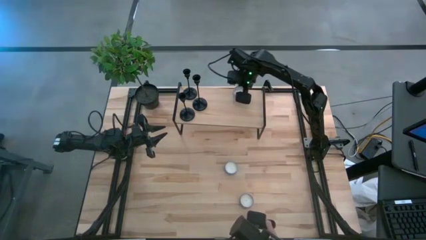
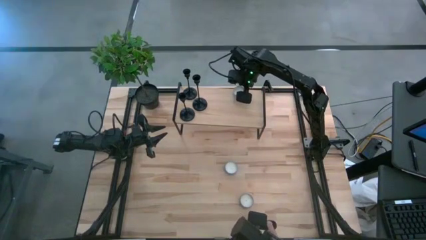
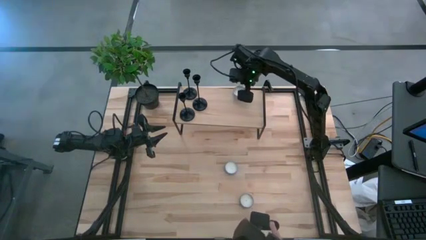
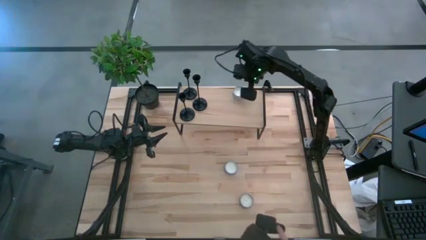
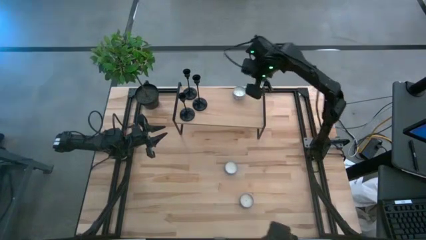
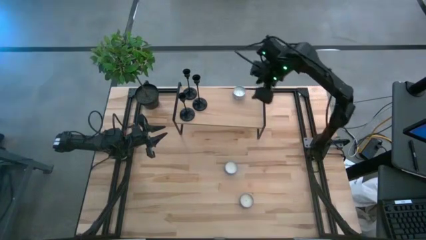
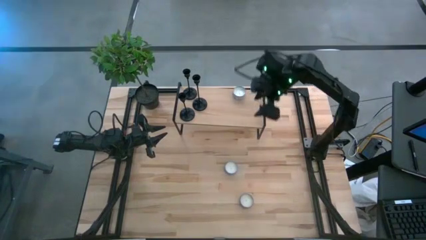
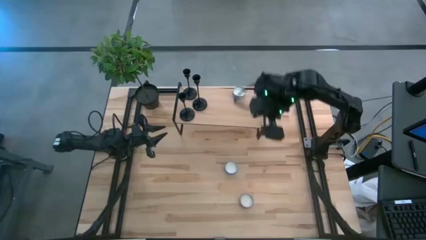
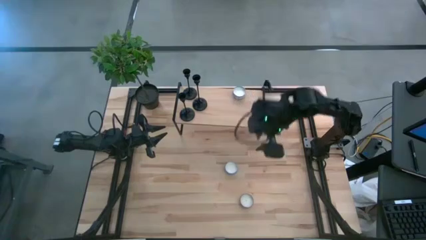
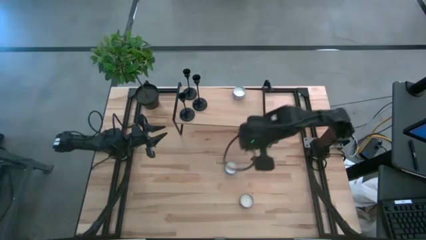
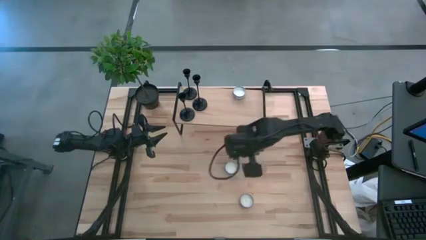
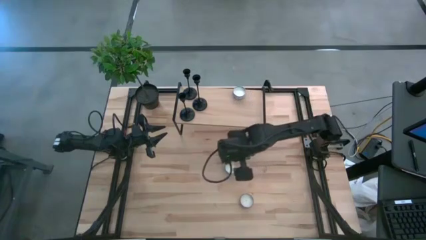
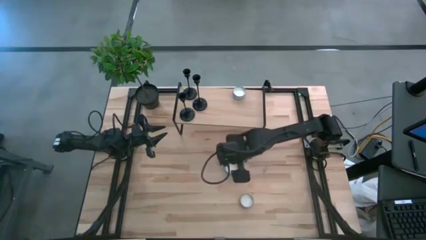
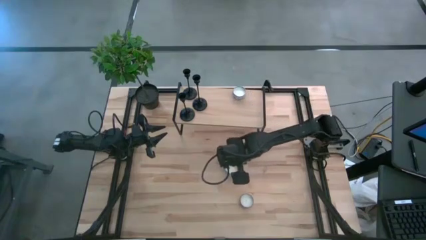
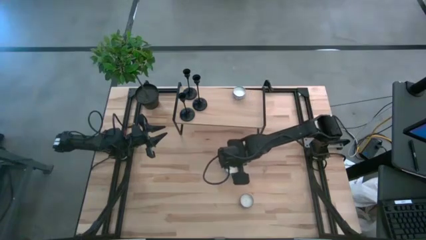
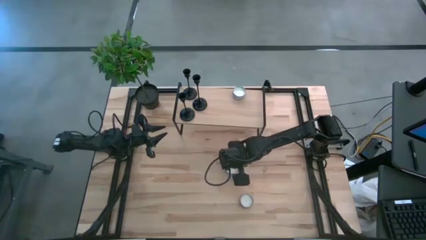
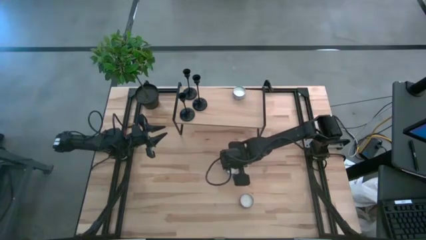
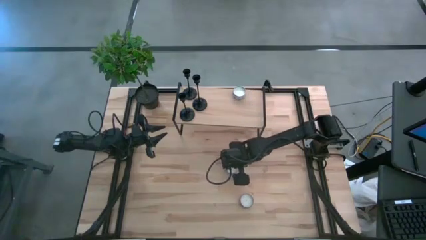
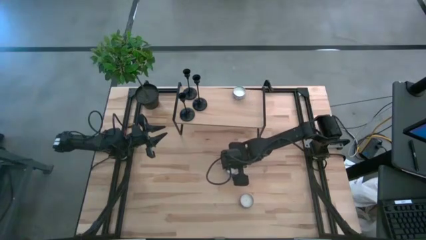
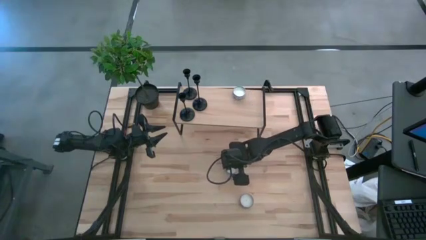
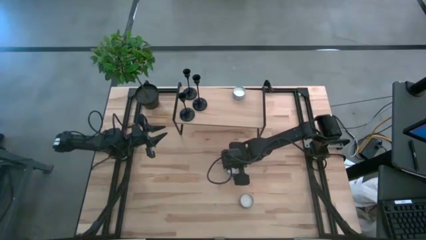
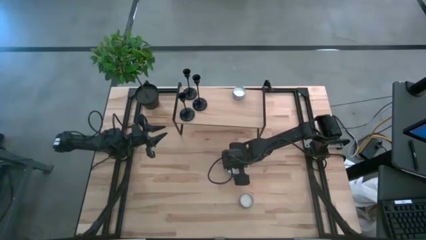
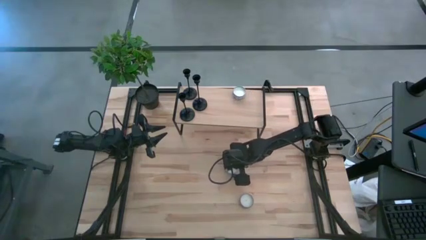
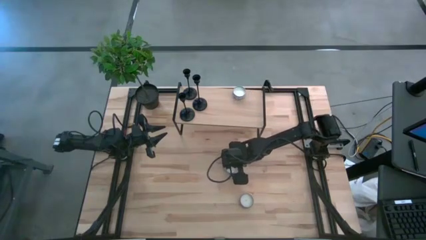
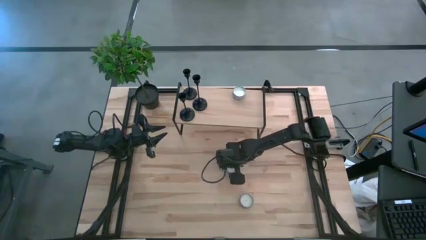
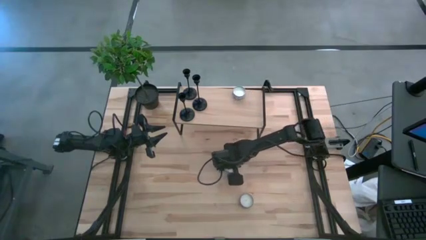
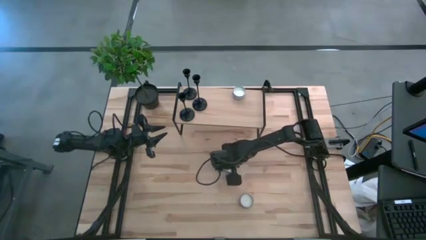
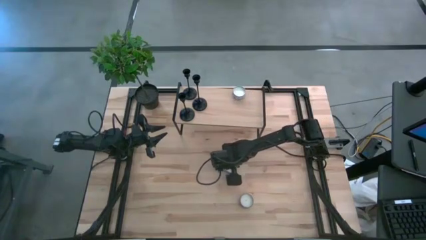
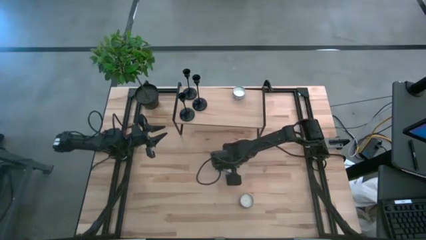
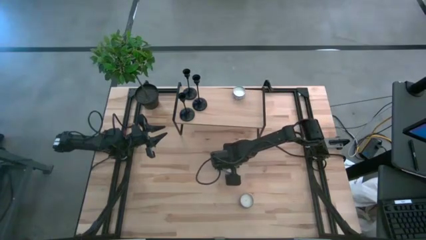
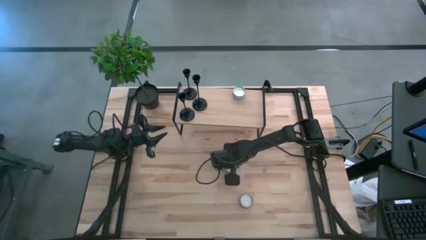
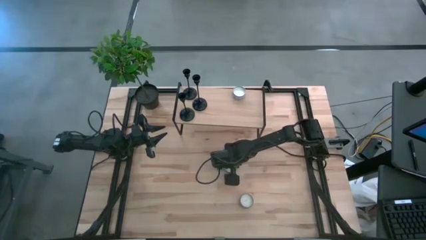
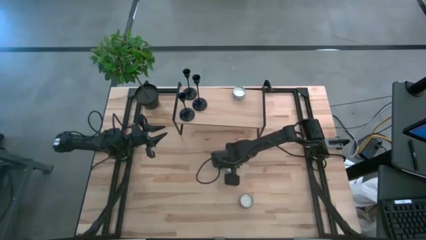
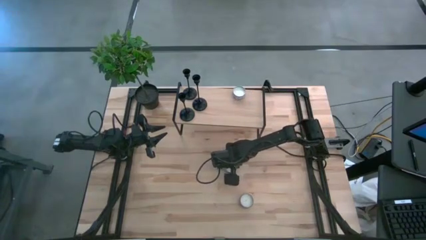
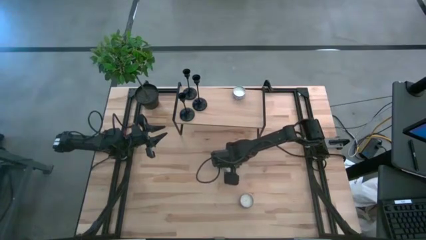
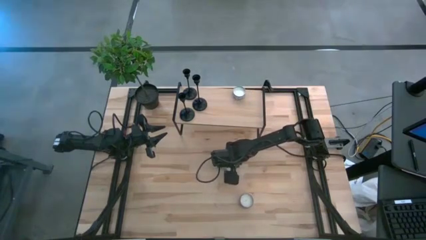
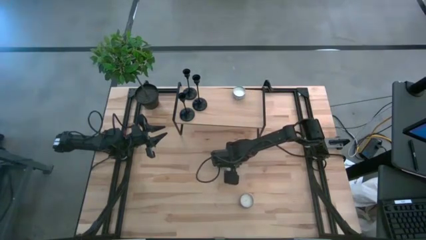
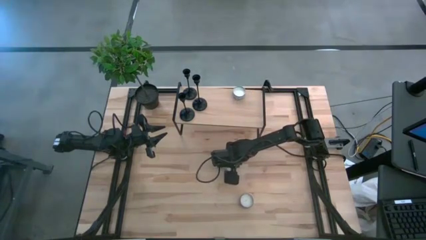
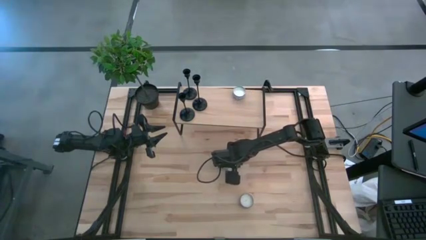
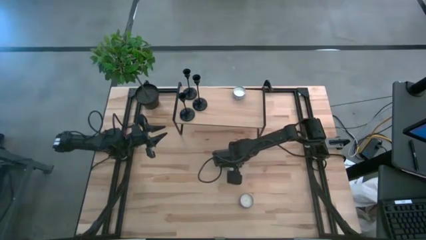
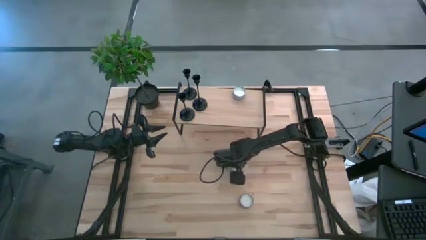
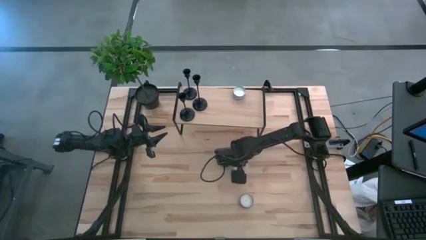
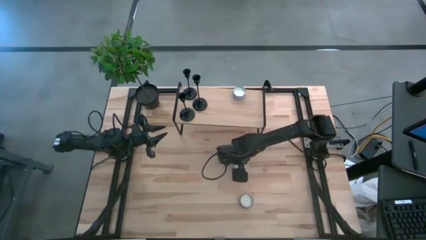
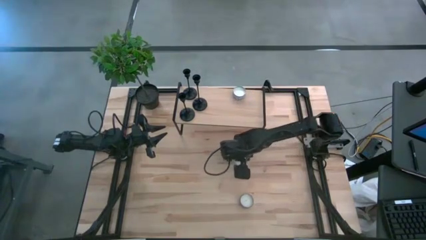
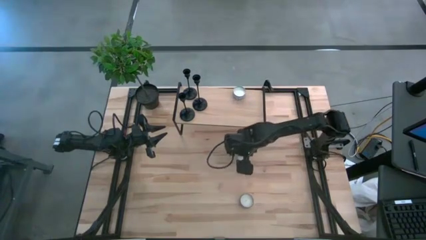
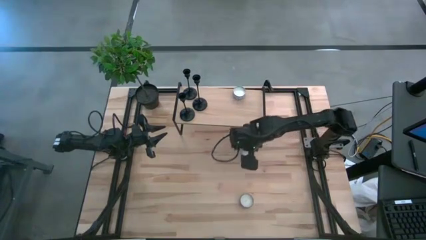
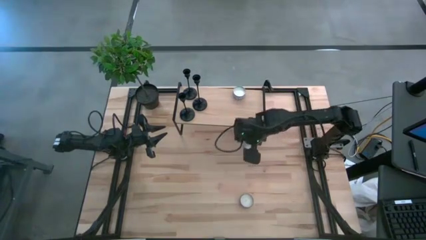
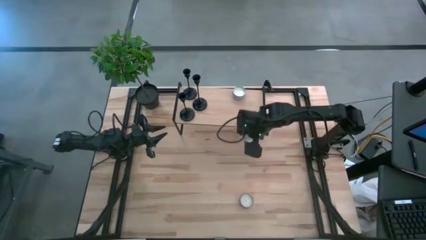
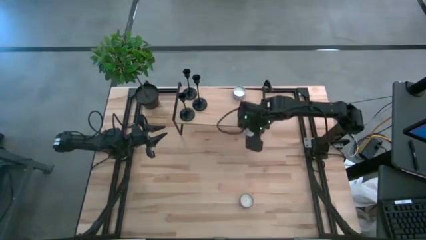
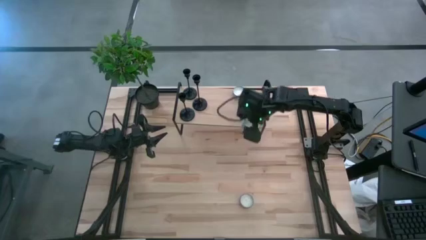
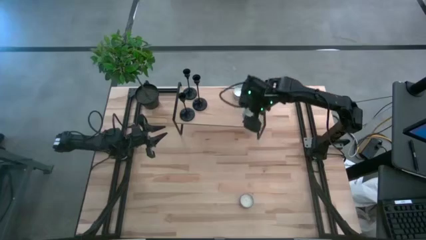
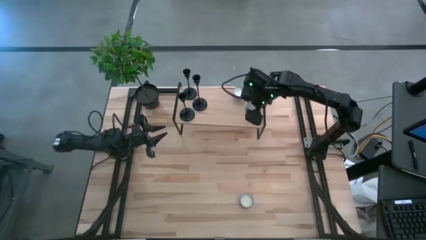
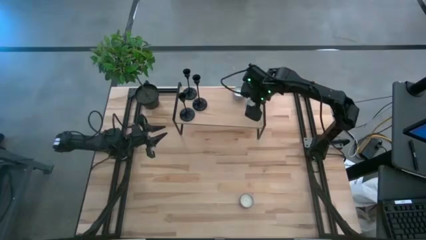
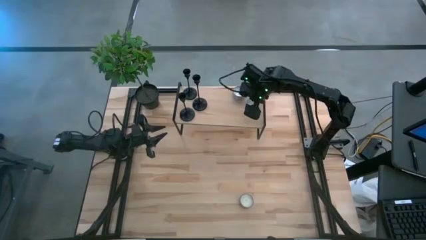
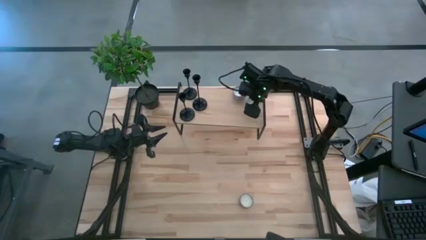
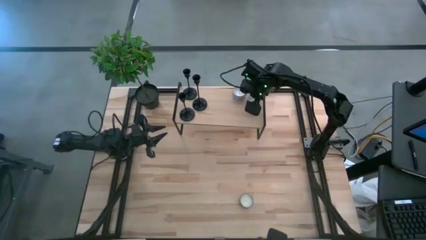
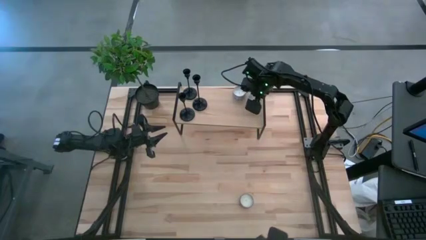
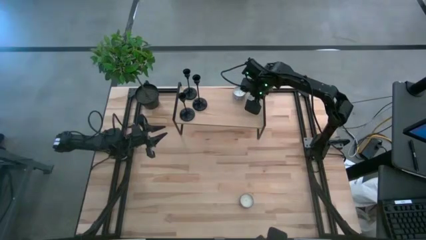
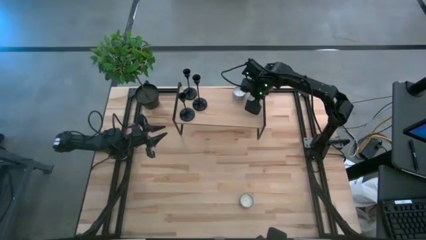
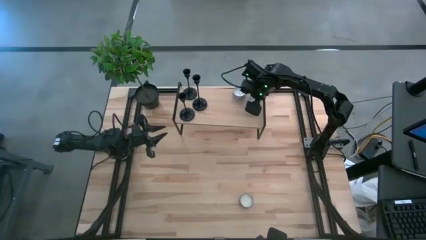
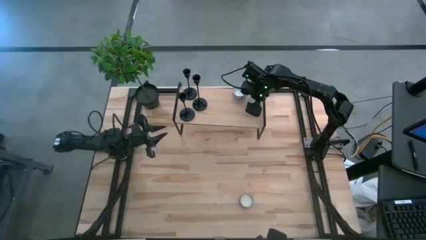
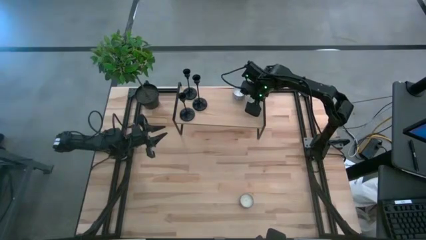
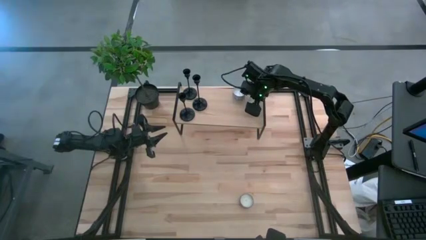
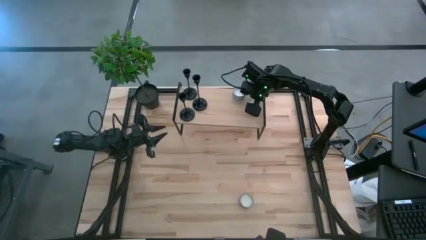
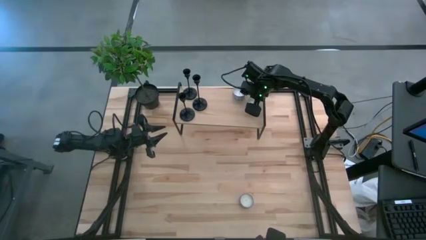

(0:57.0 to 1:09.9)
Task: Pick & Place candle stick holders
Put the blue patterned scented candle on the shelf

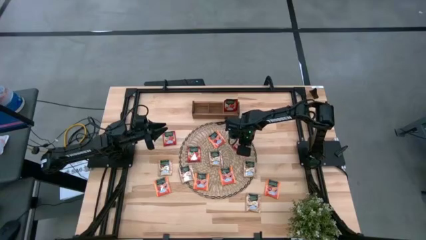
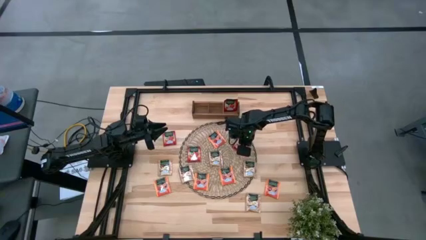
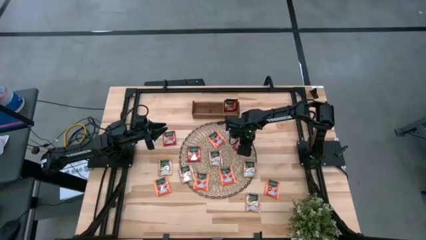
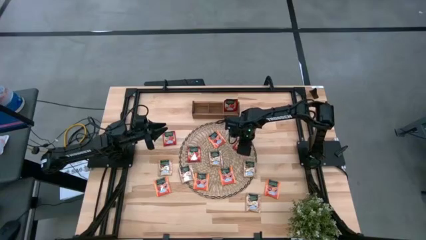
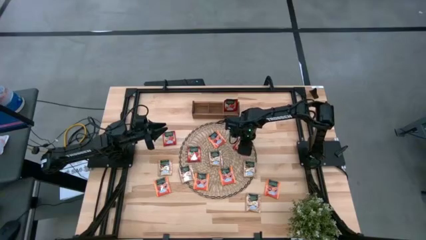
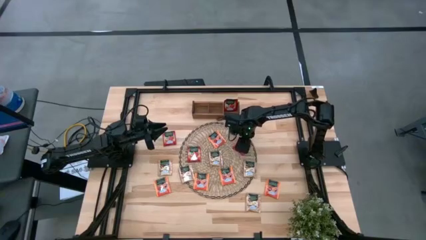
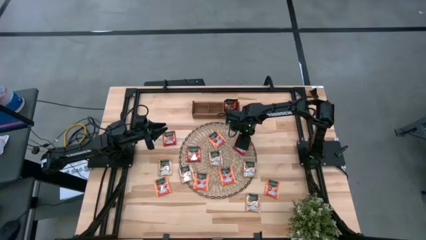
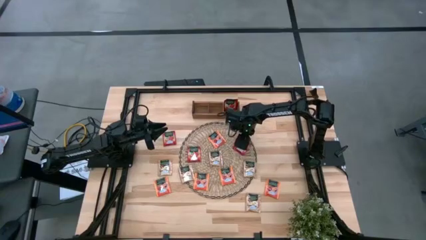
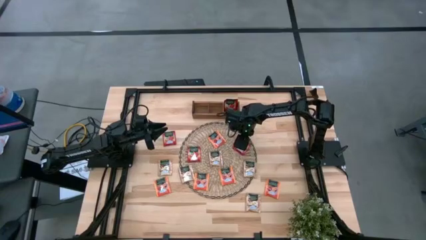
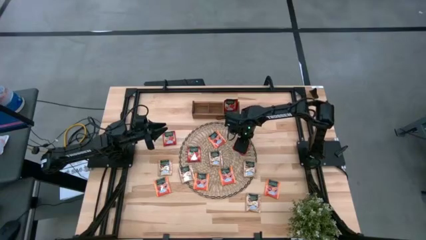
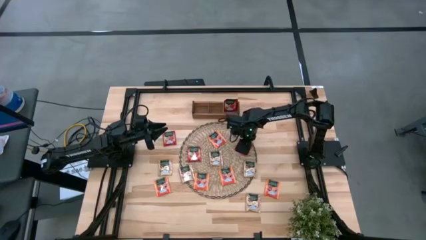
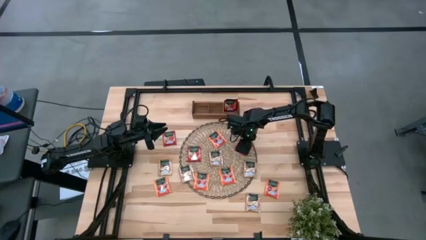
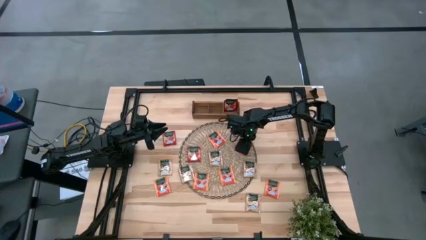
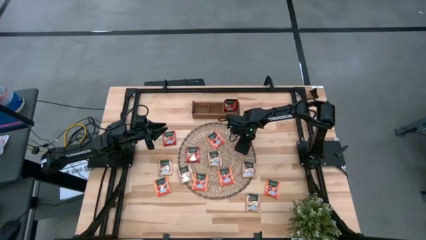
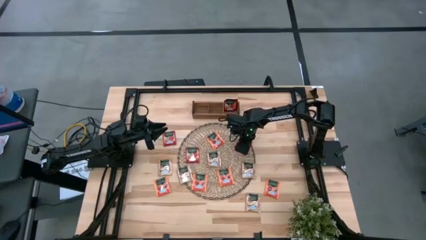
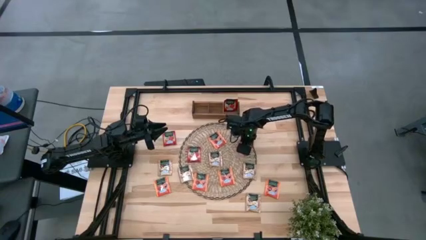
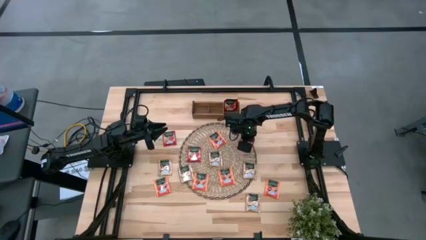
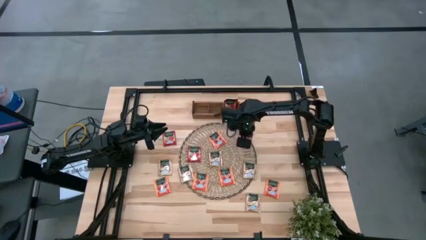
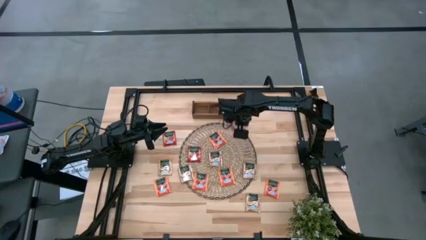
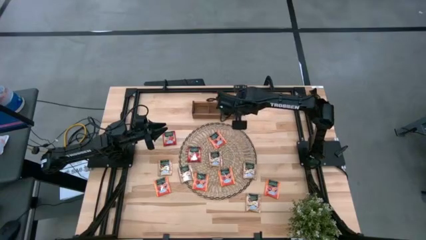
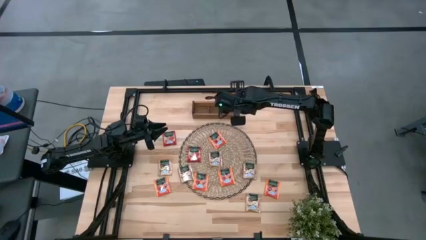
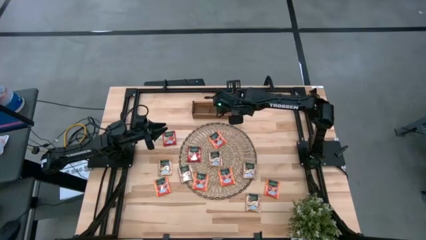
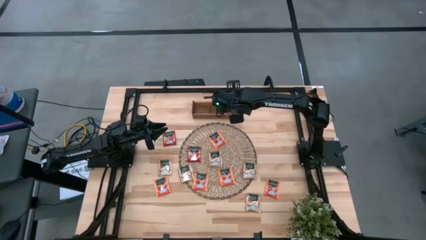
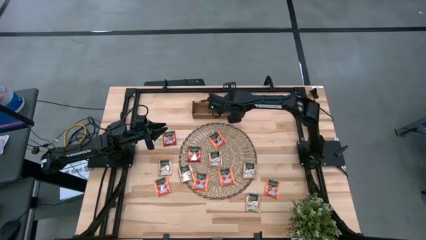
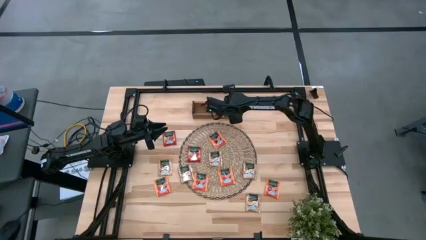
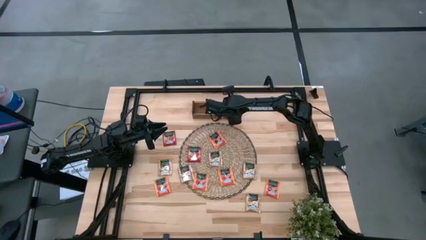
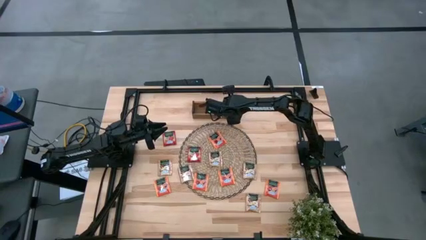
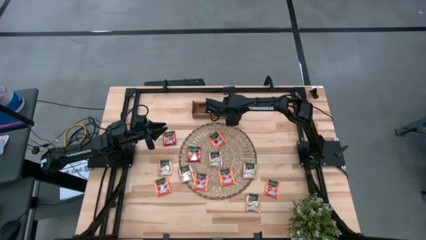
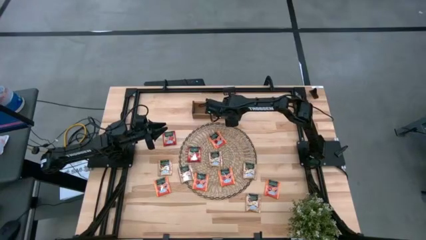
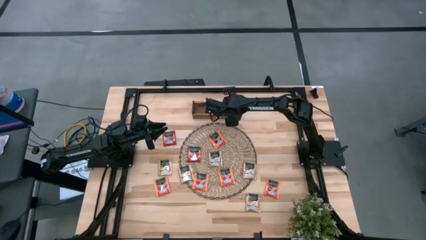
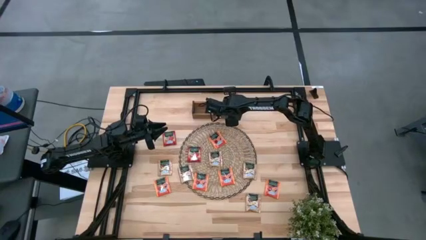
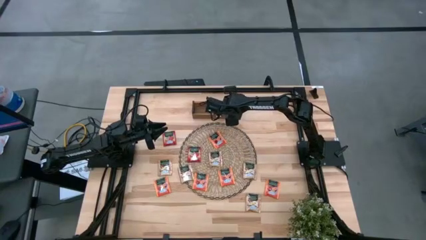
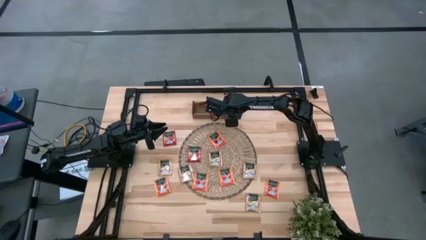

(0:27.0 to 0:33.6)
Task: Pick & Place Tea
Put the red tea bag into the right section of the wooden organizer
